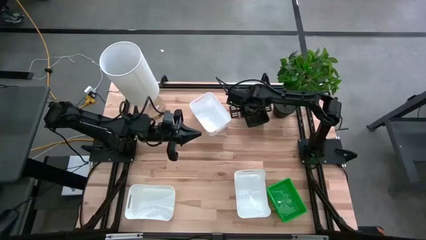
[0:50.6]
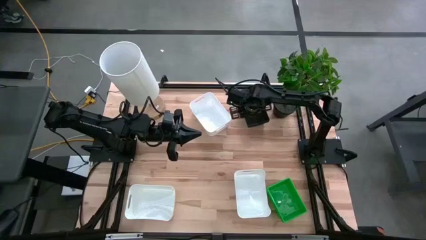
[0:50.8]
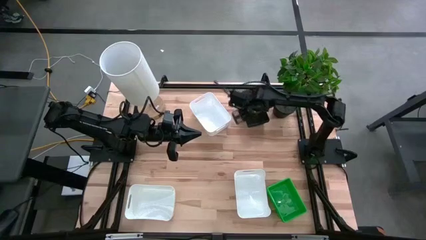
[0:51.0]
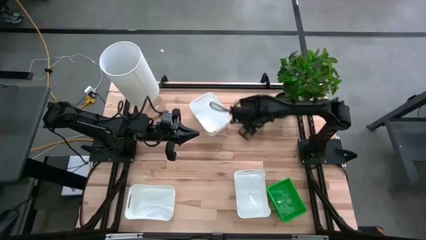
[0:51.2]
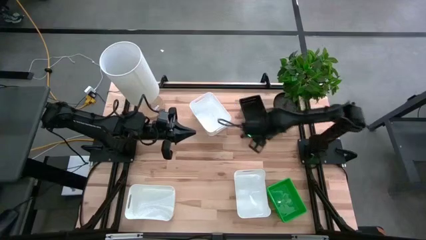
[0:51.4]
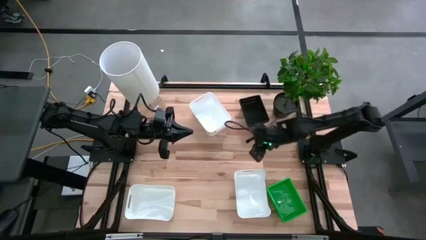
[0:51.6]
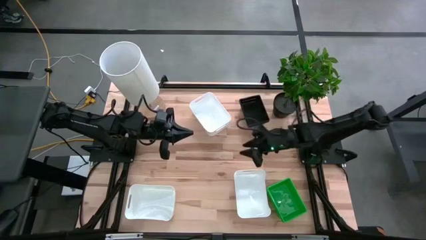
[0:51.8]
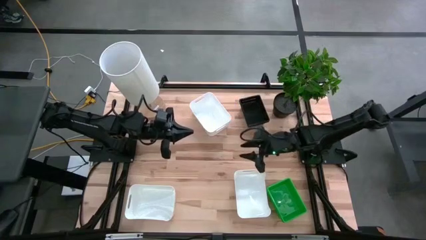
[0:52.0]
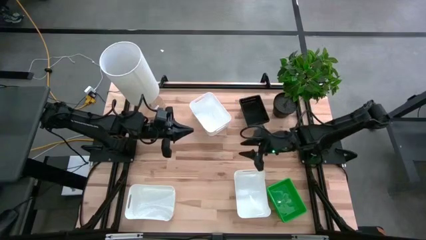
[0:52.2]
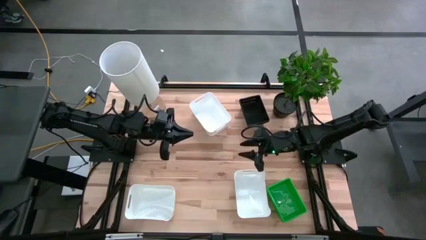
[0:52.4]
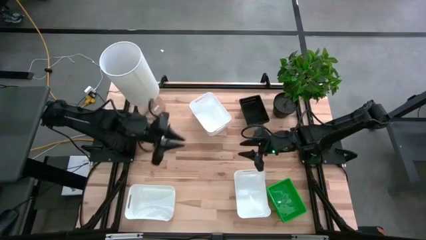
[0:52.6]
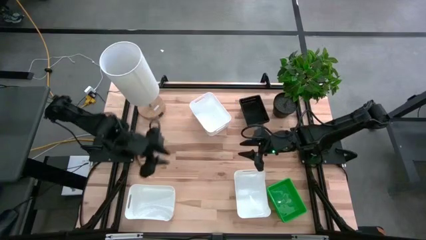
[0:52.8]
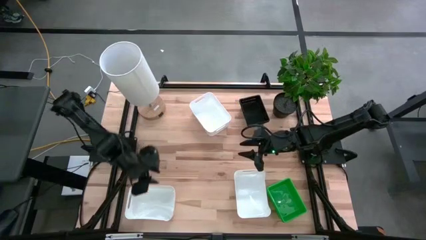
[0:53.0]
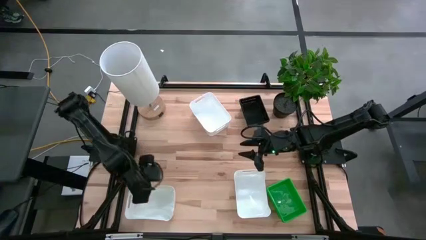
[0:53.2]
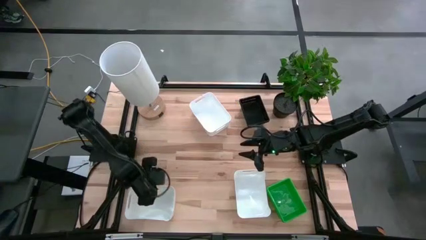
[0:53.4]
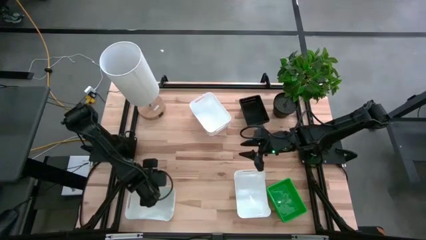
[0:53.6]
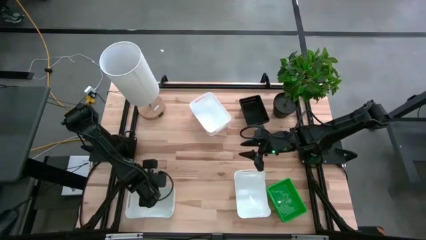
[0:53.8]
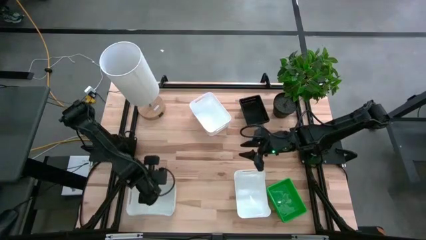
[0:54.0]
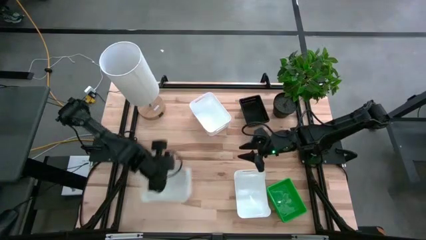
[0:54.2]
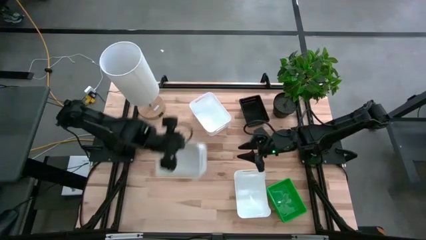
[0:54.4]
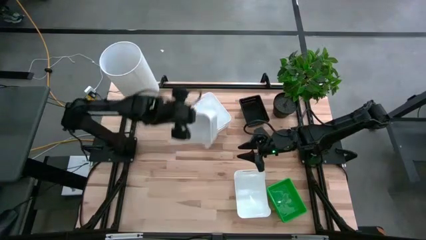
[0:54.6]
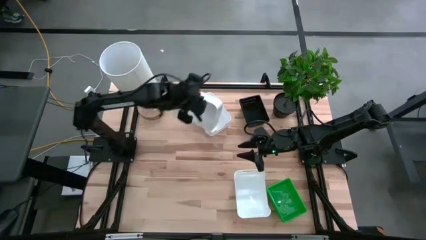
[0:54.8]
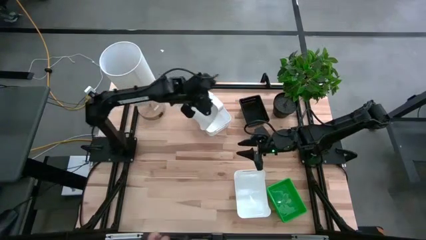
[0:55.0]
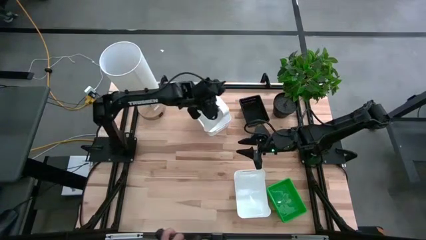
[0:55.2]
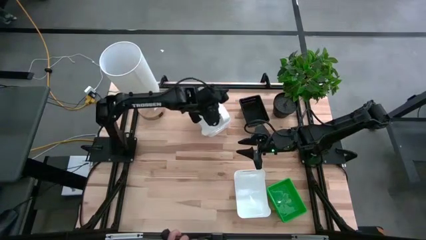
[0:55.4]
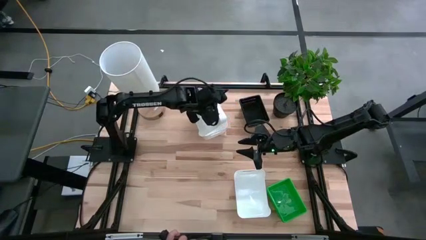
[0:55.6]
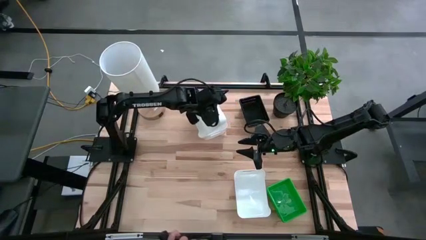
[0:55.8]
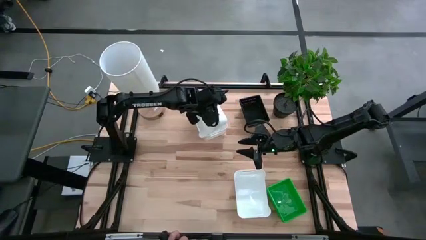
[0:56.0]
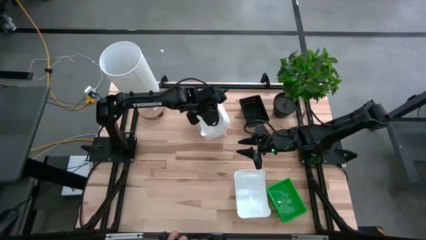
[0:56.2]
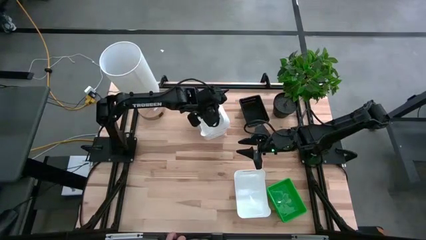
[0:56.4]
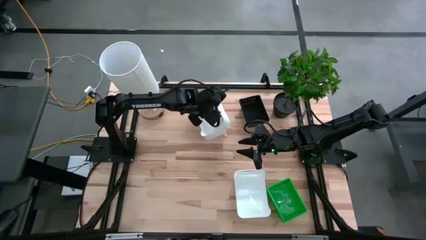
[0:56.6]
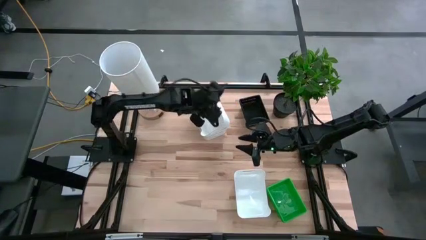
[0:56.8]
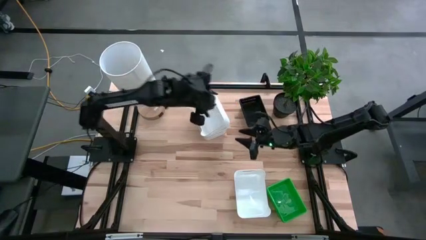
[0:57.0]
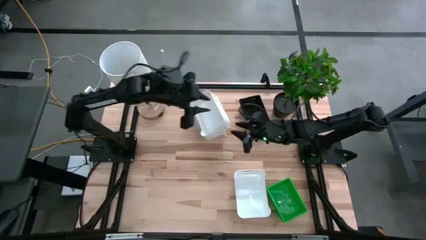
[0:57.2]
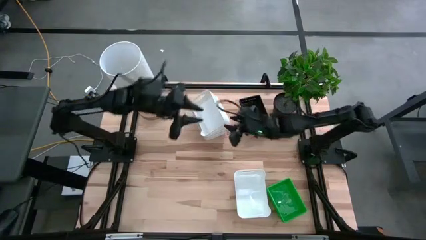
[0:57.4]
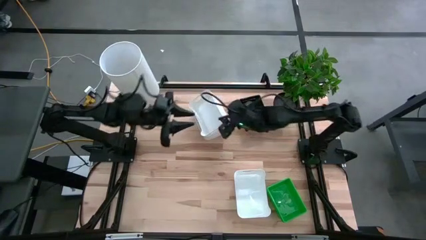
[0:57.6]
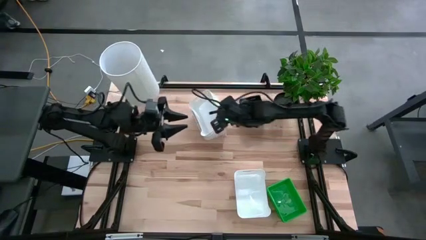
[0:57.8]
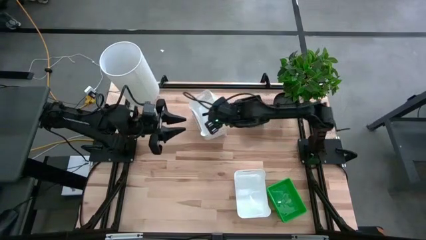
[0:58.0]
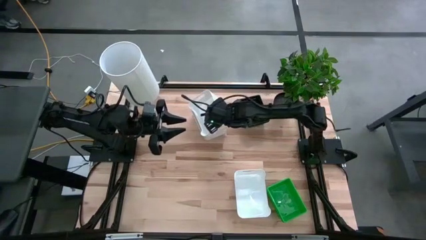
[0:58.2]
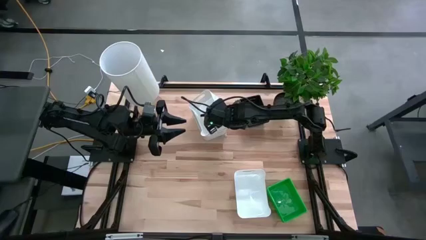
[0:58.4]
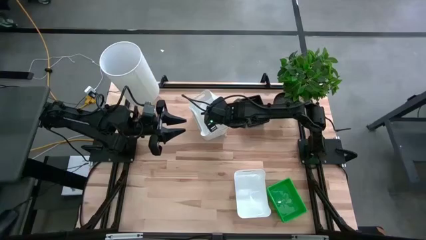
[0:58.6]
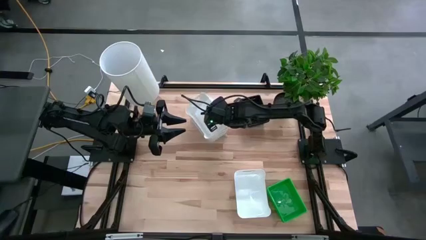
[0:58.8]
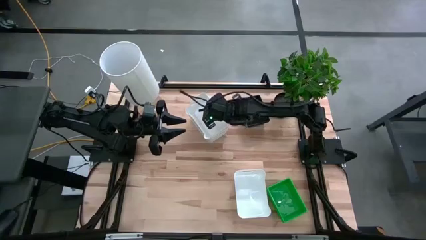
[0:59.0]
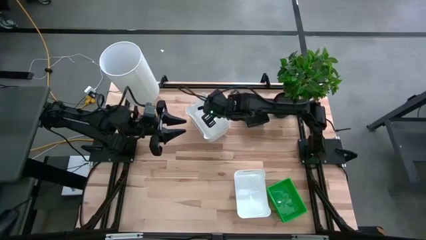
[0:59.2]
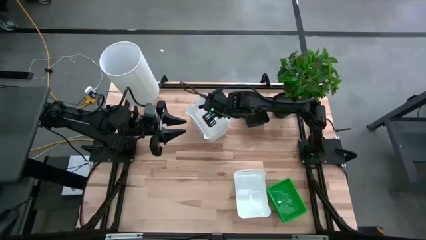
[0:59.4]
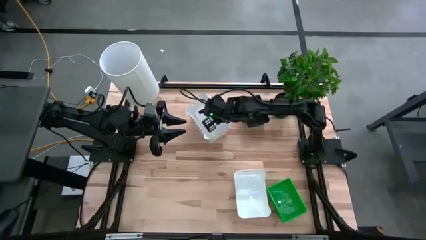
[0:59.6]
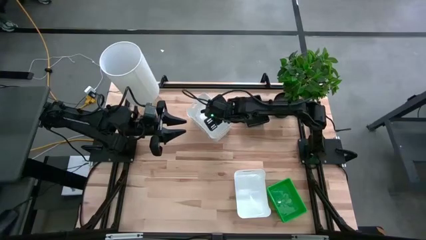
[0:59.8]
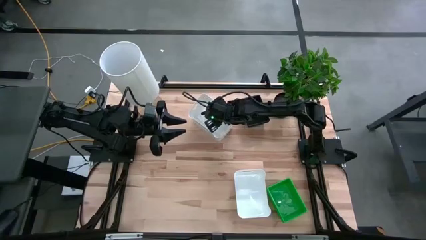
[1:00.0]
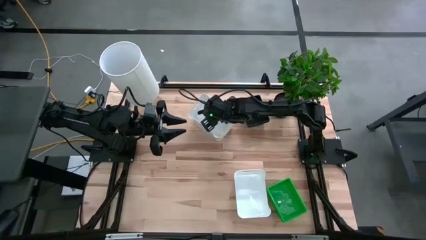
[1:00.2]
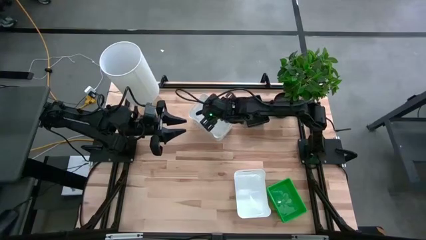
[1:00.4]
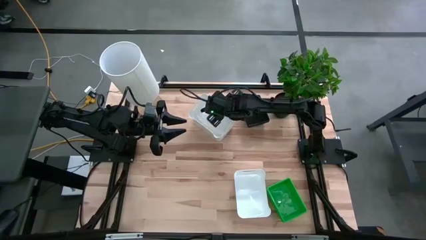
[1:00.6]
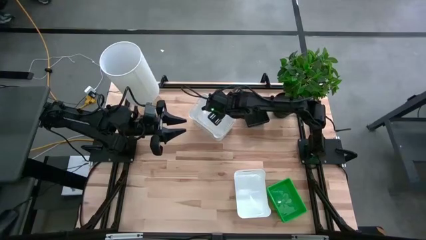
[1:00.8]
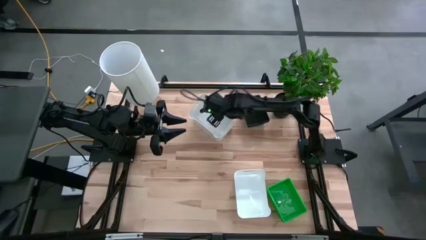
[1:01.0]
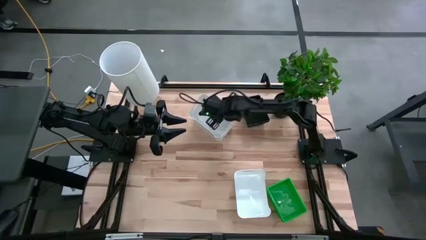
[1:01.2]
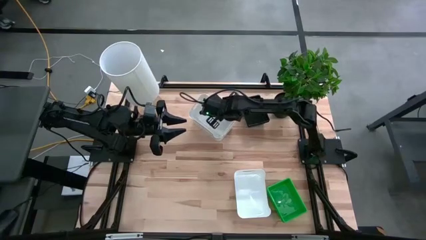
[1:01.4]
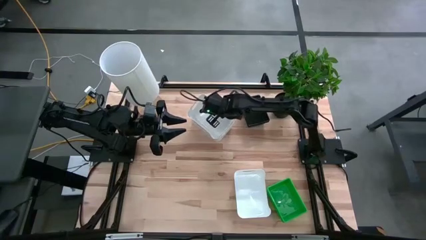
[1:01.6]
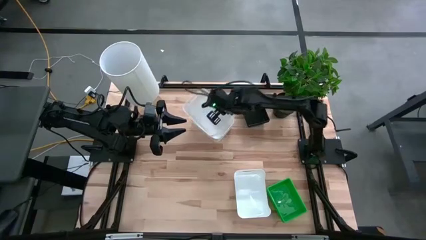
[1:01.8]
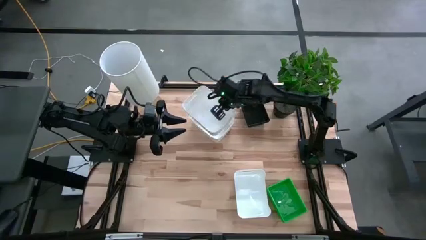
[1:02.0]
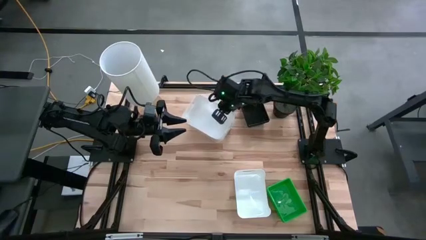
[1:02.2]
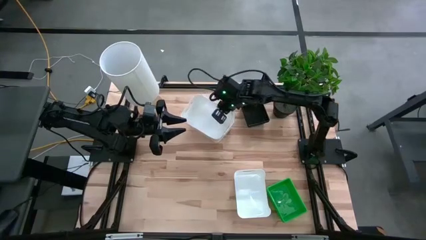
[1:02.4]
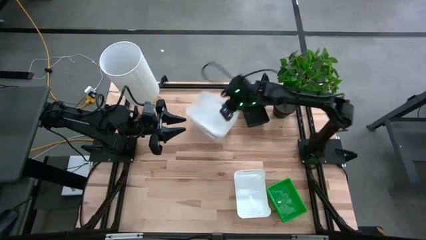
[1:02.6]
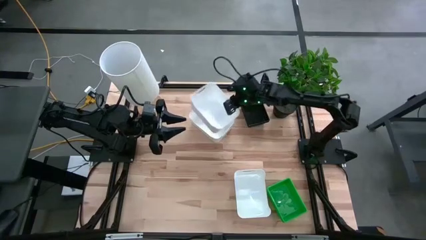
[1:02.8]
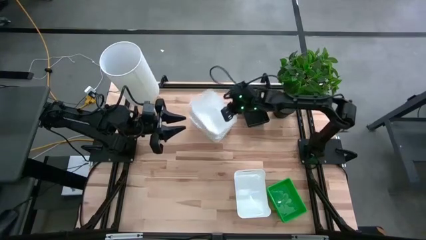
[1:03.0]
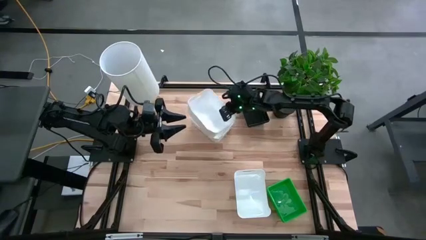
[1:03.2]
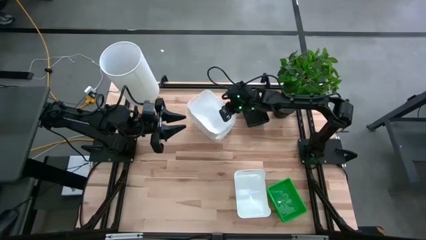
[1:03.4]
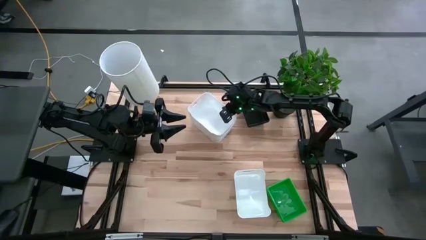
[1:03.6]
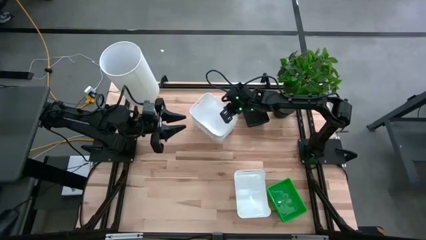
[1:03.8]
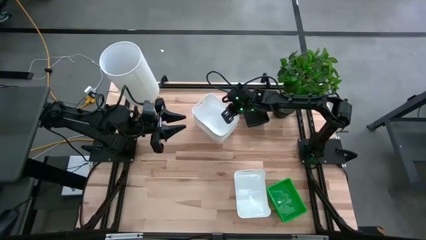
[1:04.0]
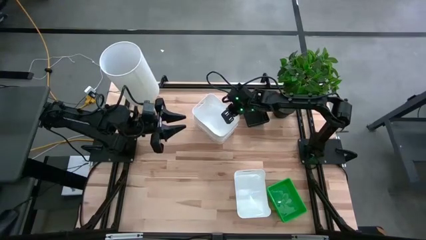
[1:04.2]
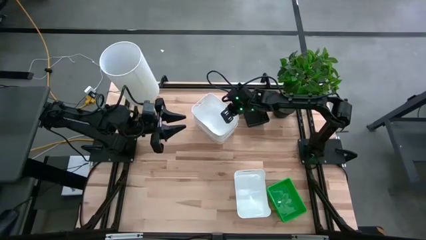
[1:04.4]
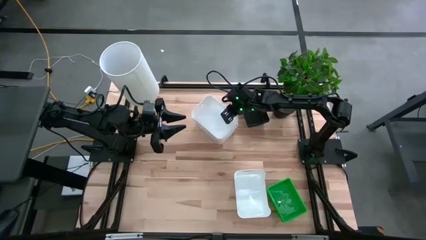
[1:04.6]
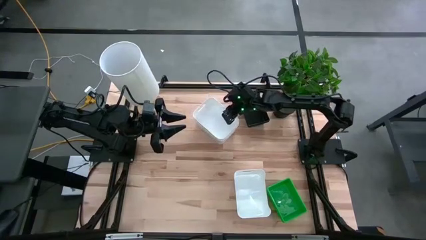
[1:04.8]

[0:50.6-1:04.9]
Stack the bottom left white bin on top of the top white bin

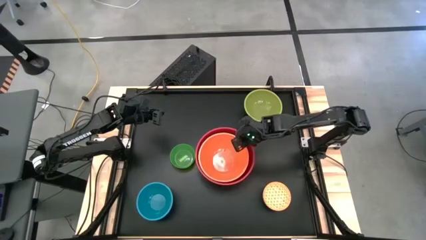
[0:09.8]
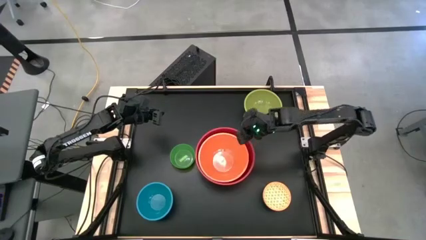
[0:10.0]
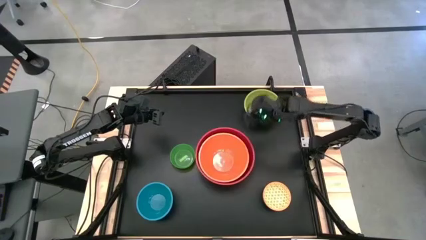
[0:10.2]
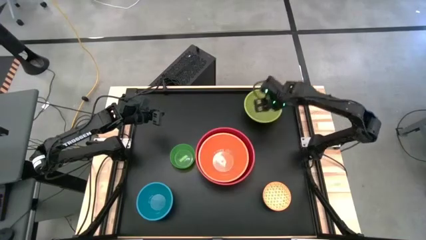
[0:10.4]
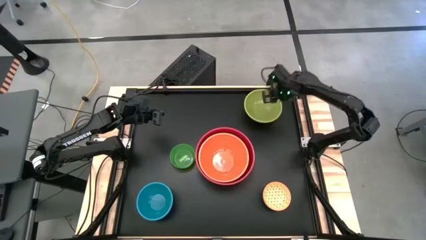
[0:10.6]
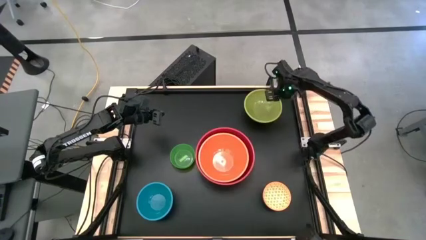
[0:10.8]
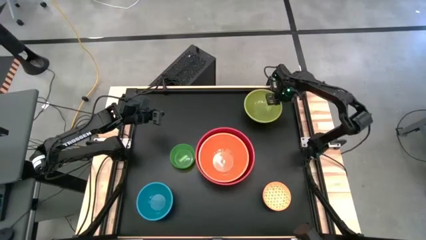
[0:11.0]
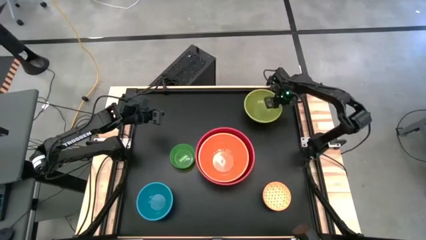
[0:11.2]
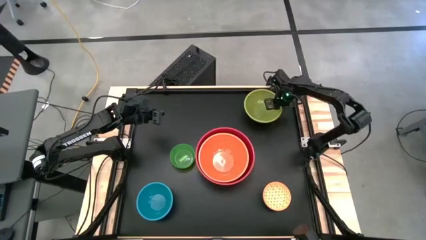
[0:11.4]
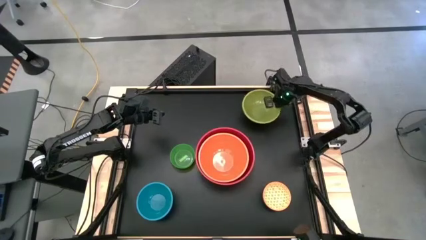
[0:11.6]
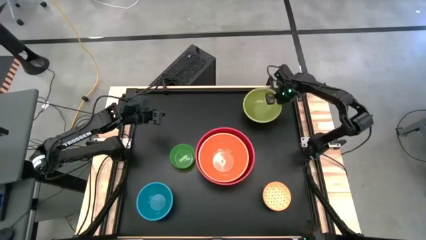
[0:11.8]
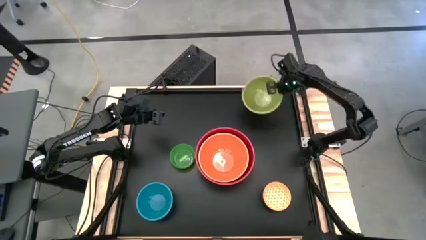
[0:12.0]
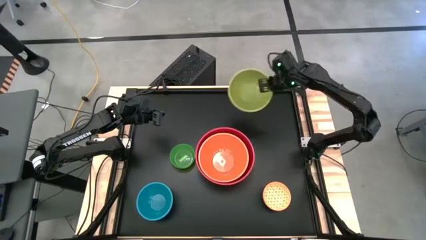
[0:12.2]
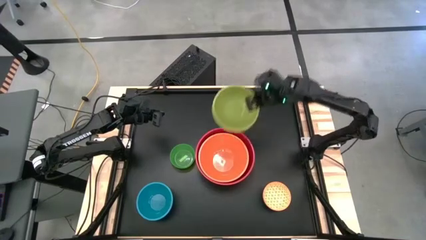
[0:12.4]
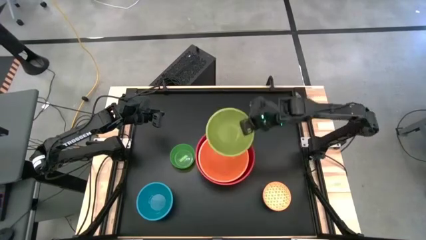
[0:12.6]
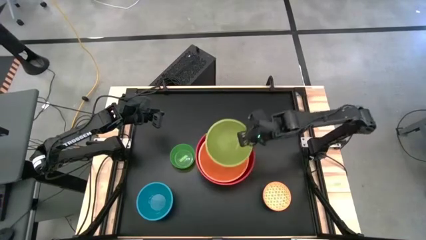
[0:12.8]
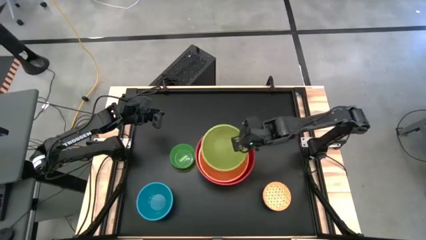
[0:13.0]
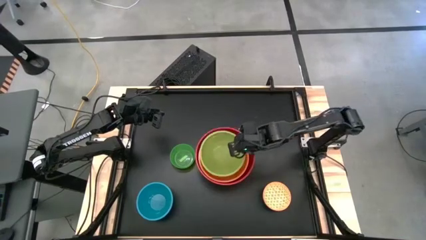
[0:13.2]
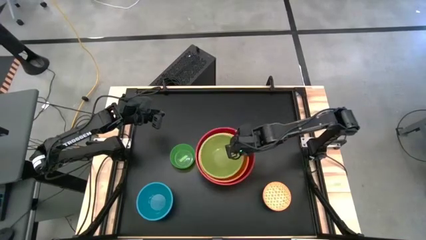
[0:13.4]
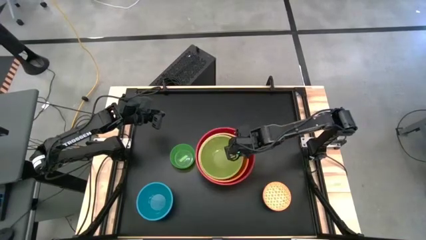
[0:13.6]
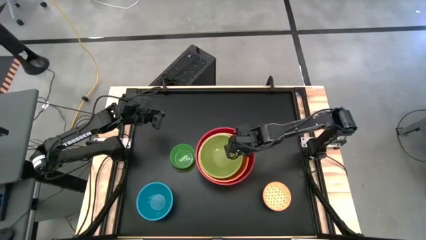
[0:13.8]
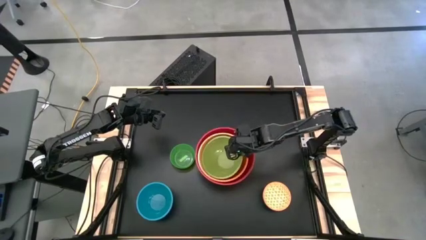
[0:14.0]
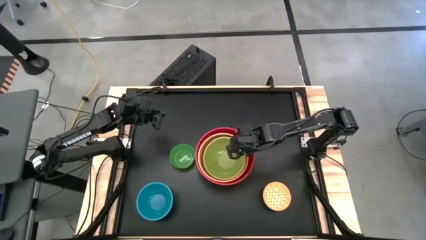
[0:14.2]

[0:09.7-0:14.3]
Stack the light green bowl on top of the orange bowl
